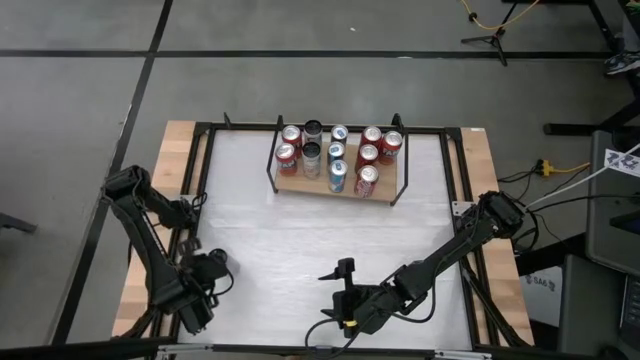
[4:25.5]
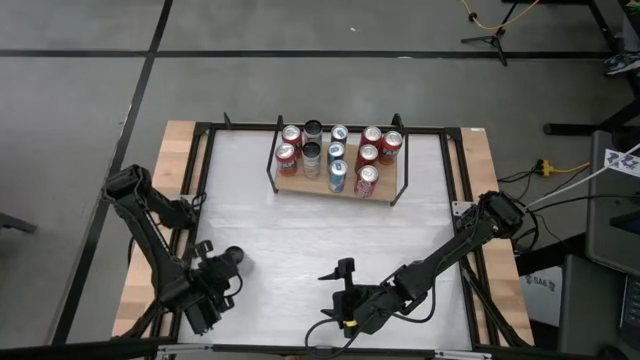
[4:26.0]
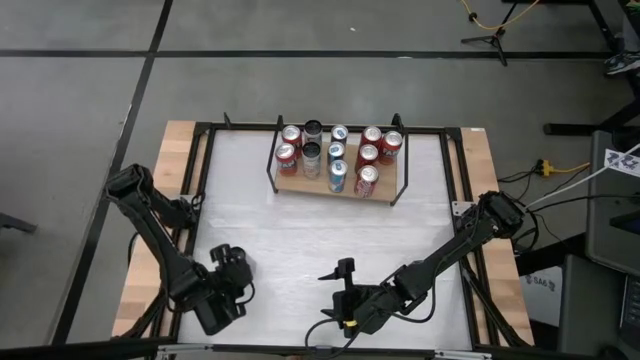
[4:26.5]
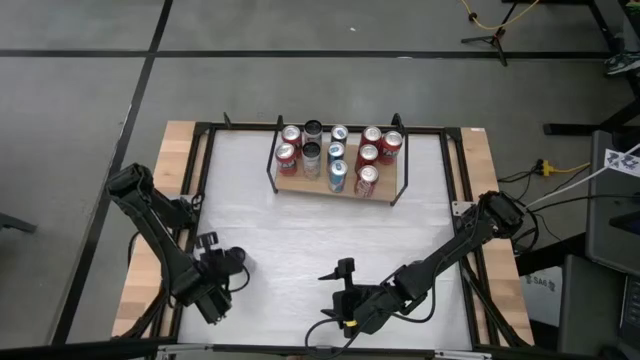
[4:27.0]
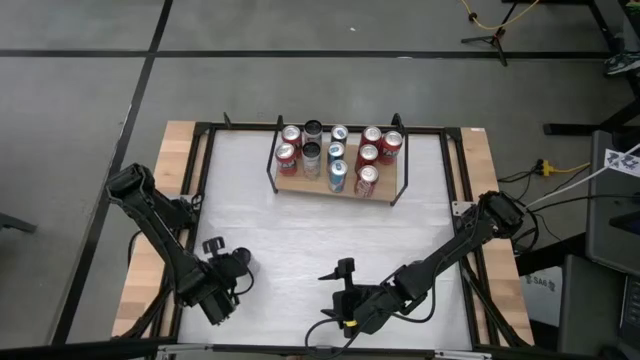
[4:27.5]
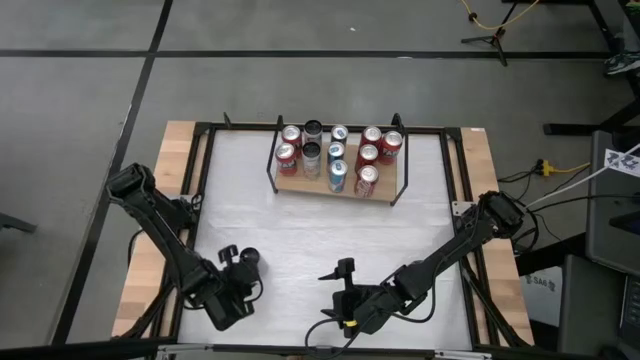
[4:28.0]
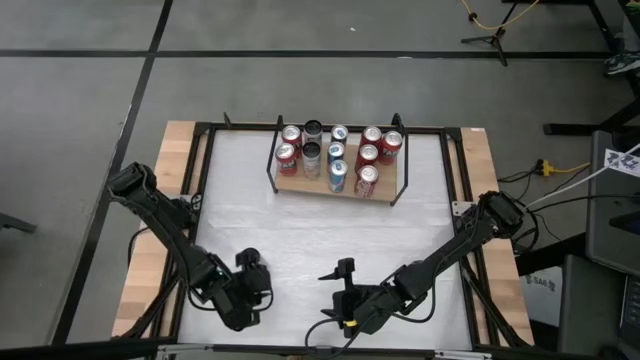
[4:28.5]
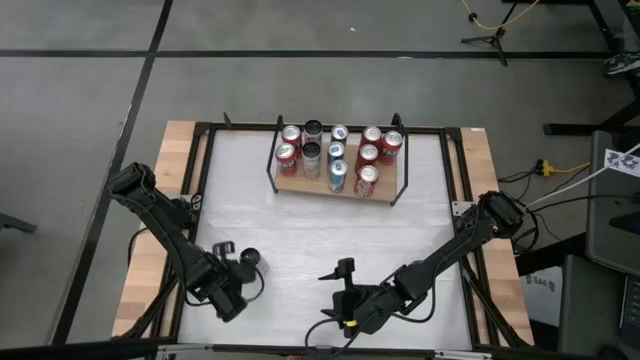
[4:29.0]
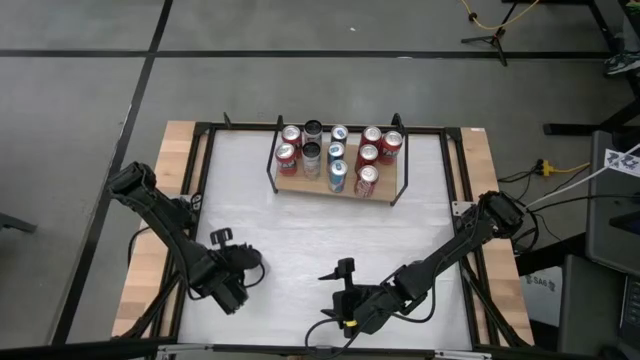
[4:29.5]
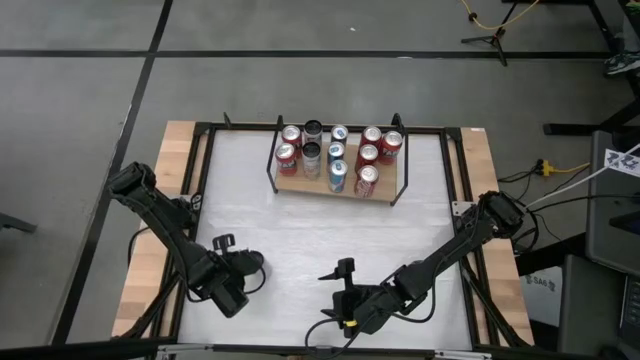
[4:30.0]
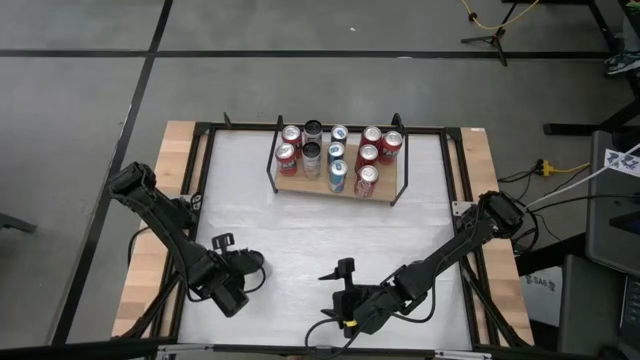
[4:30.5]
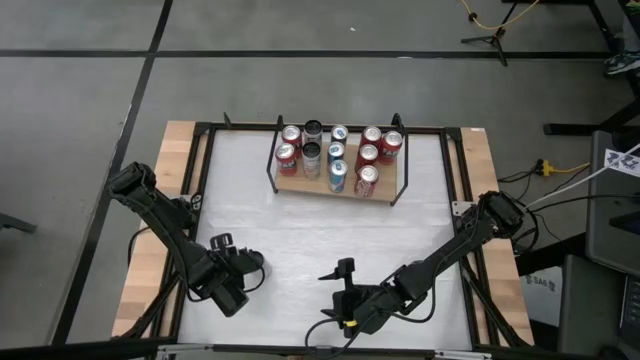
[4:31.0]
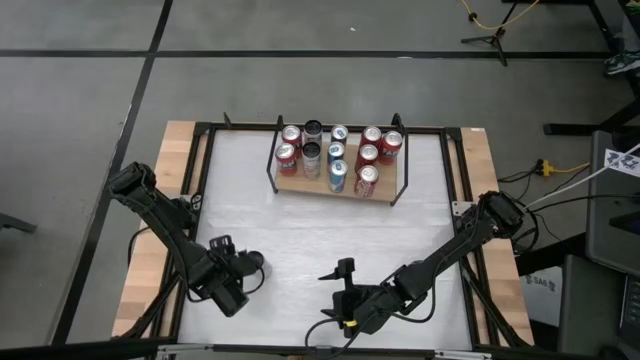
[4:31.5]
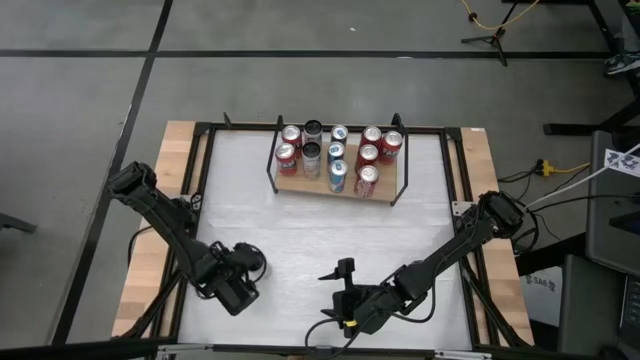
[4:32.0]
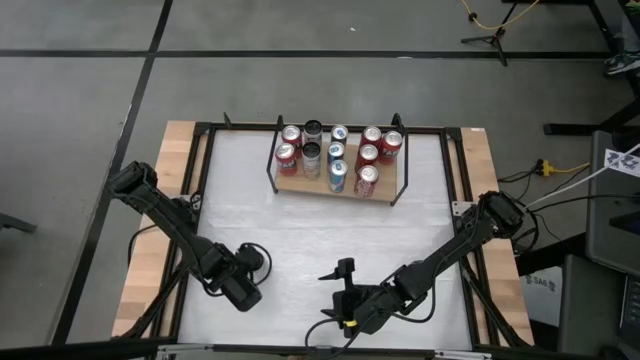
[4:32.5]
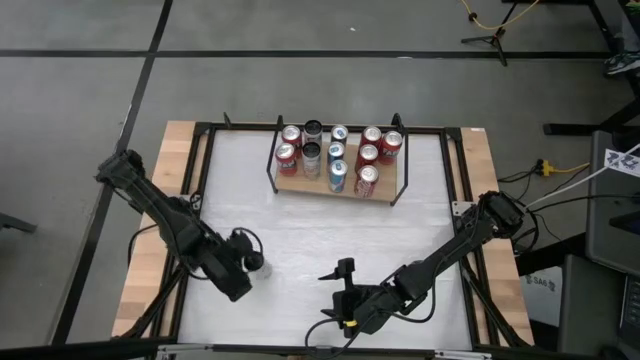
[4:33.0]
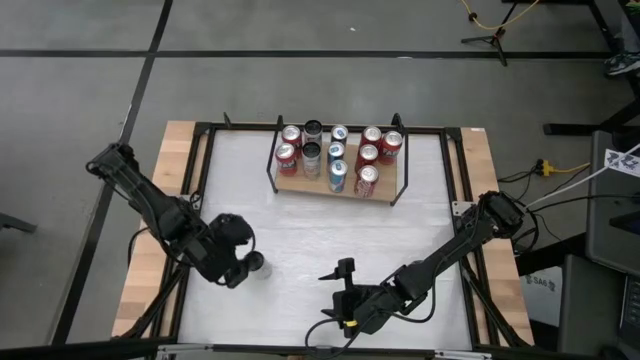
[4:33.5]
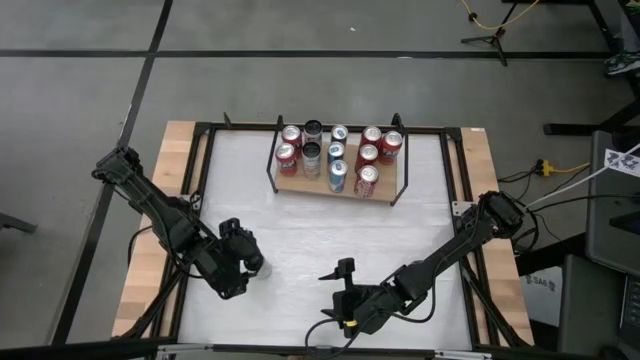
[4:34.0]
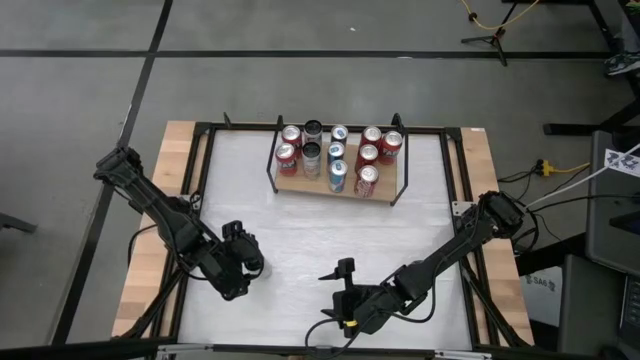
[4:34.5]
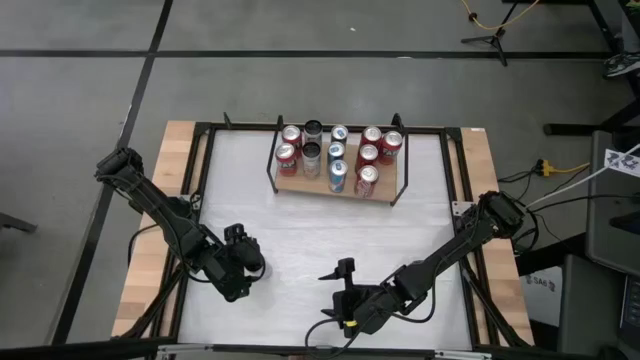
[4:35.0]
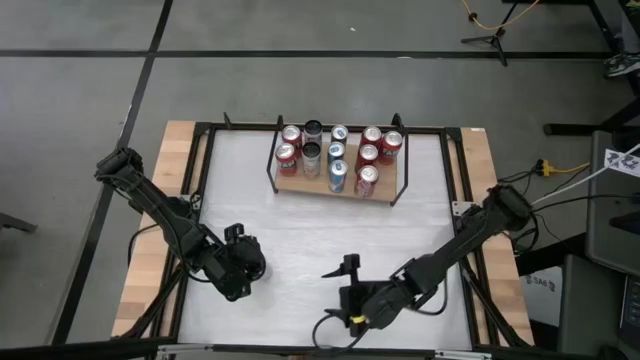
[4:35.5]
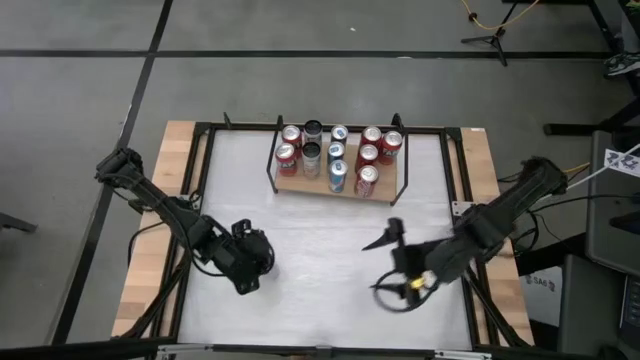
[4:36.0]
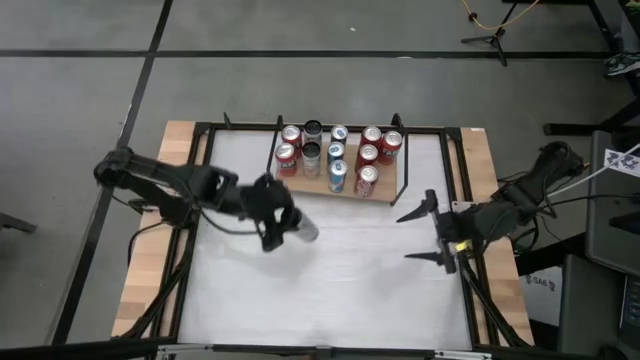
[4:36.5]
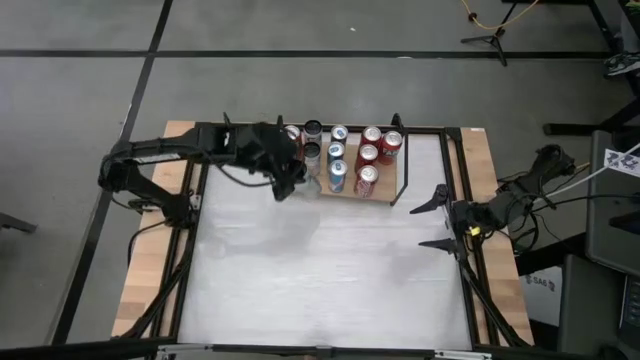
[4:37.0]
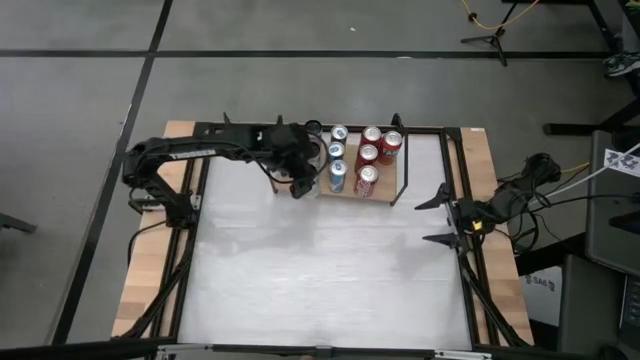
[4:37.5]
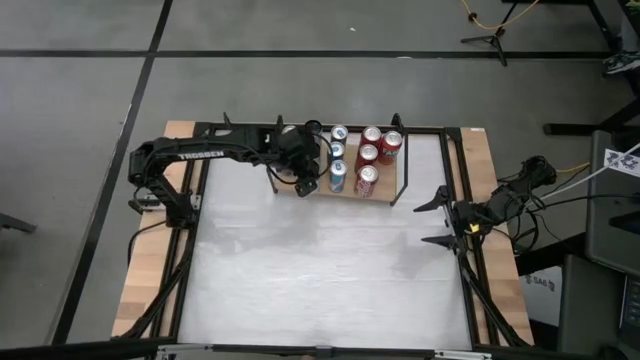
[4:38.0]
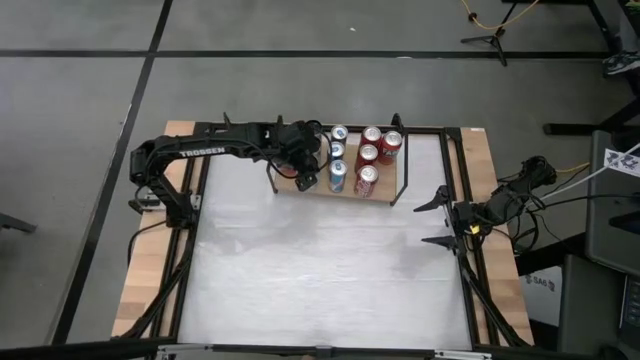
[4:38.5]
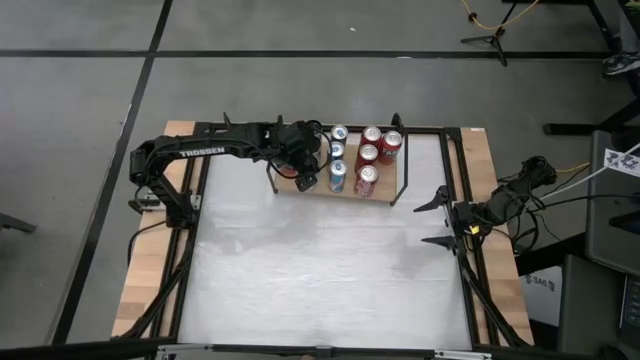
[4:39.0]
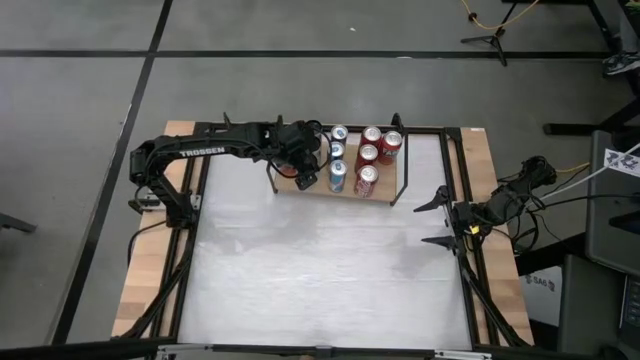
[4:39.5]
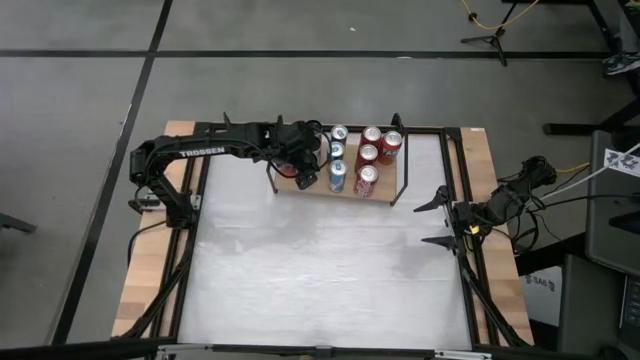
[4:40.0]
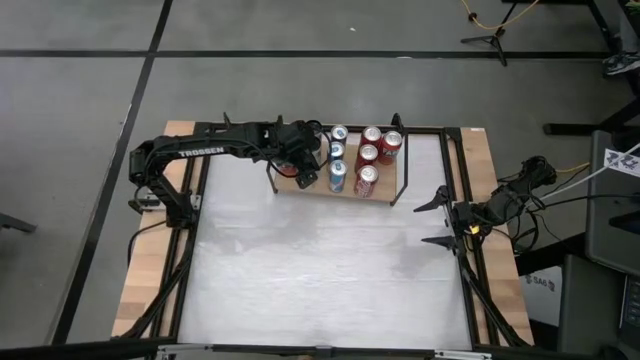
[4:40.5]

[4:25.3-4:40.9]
Task: Place canned beverage on shelf
Put the white-pink soda can on the shelf aligned with the white-pink soda cans

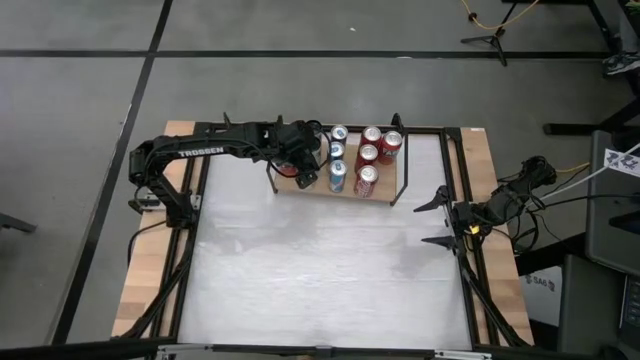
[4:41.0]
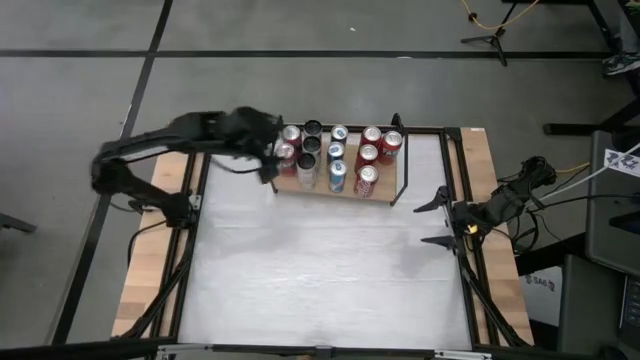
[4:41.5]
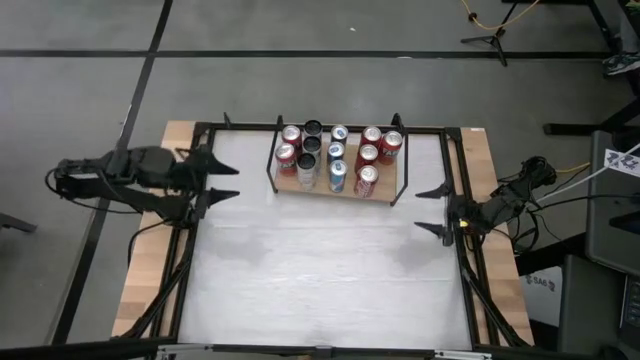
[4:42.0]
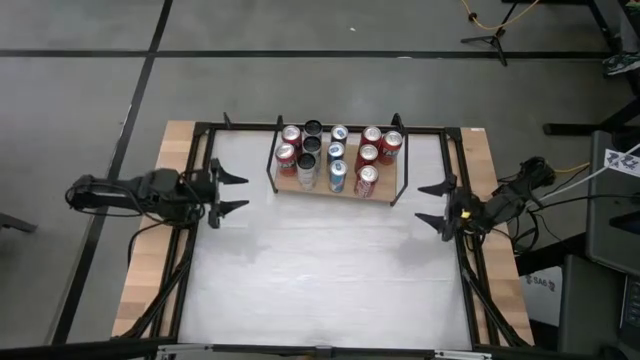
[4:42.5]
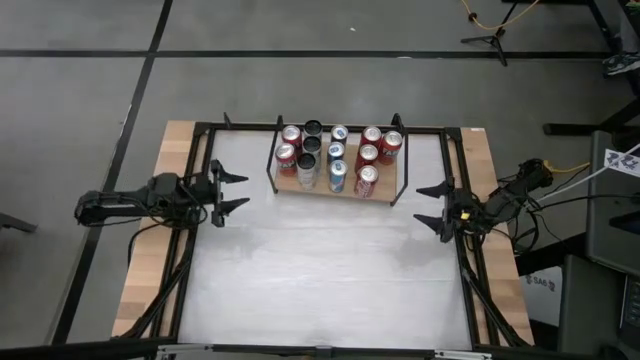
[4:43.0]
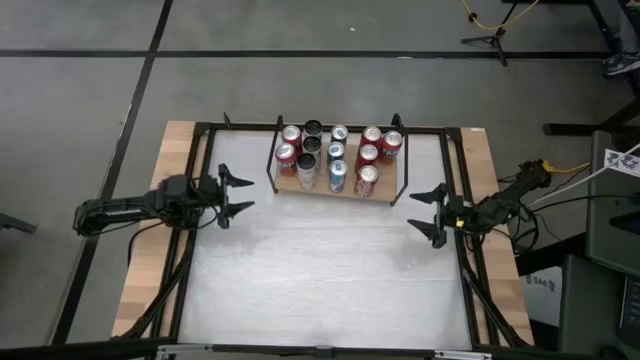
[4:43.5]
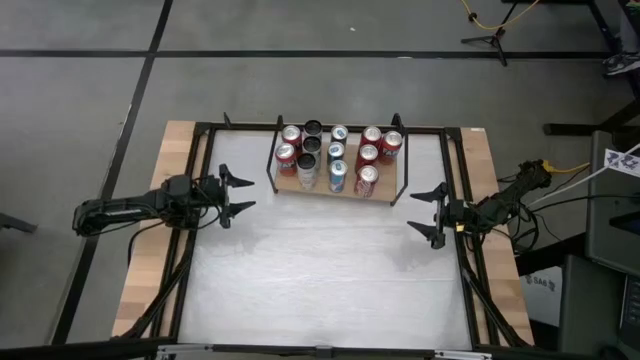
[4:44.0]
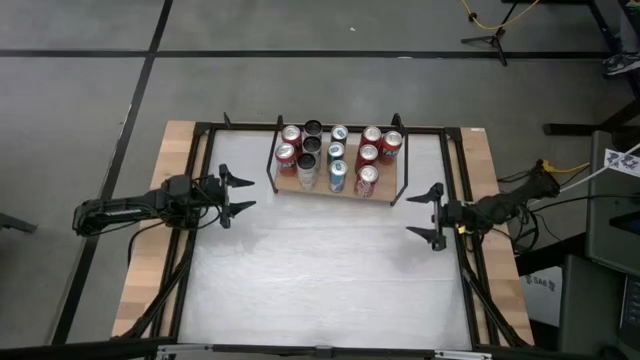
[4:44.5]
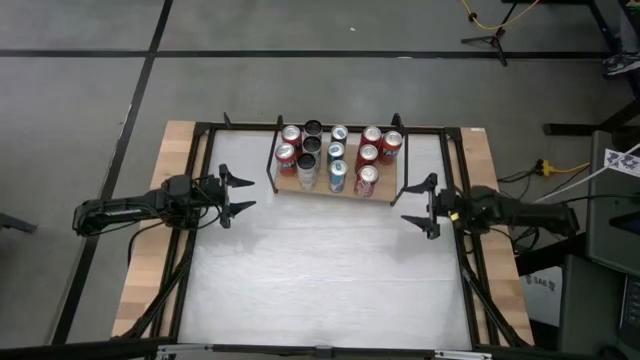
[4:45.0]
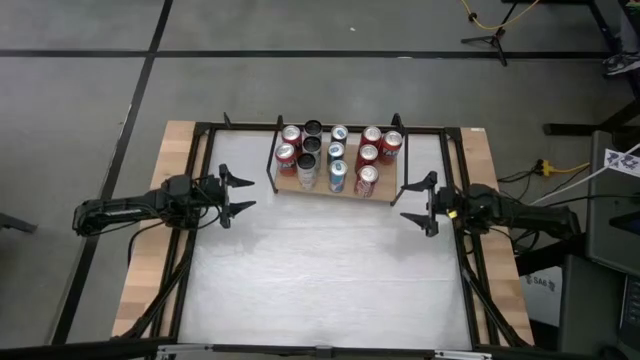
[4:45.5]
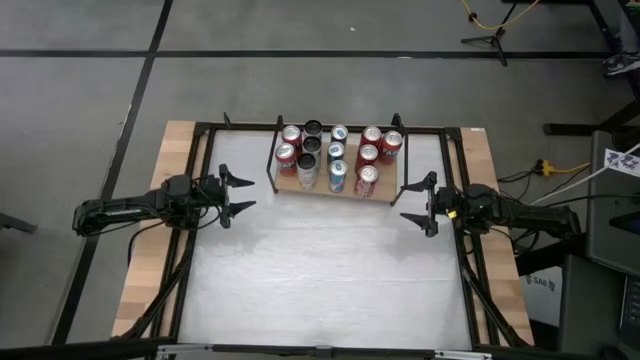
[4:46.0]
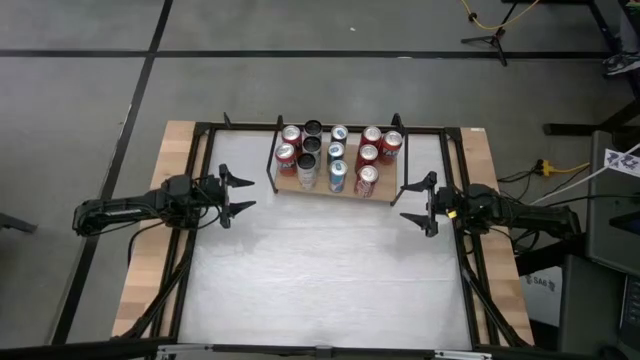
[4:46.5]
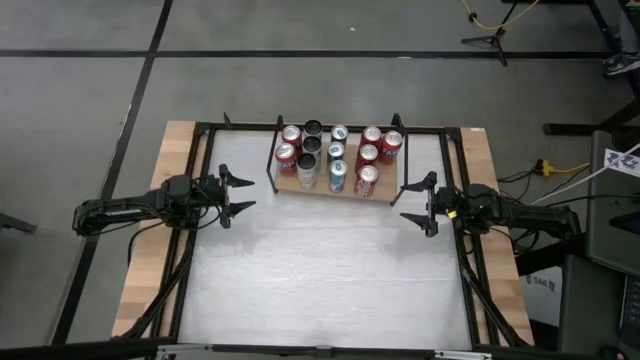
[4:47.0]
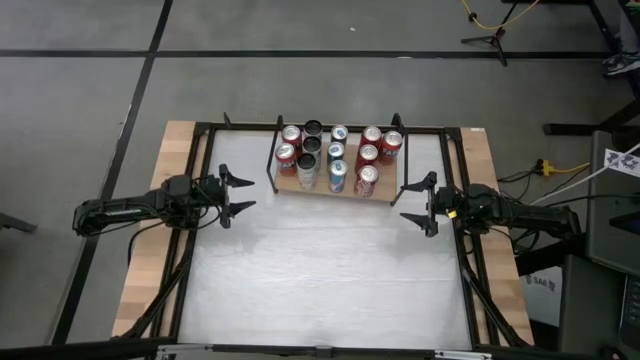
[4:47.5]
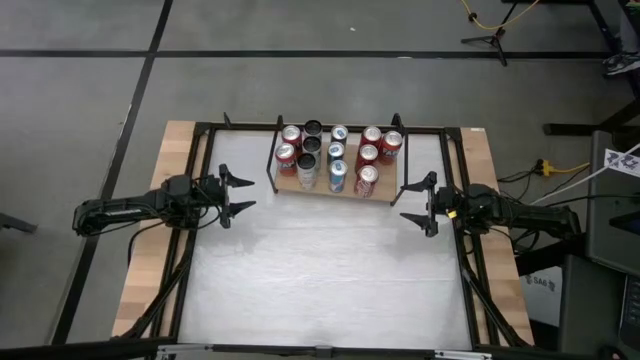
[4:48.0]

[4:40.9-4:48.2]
Return to Home Position
